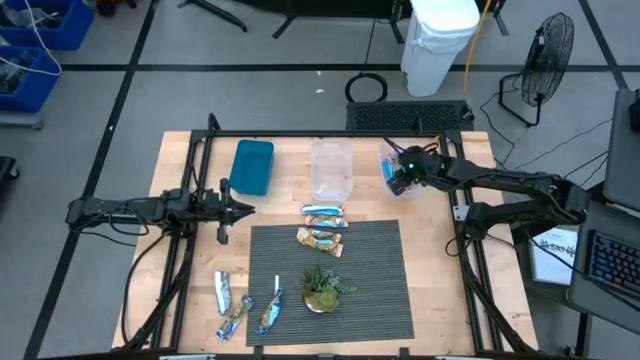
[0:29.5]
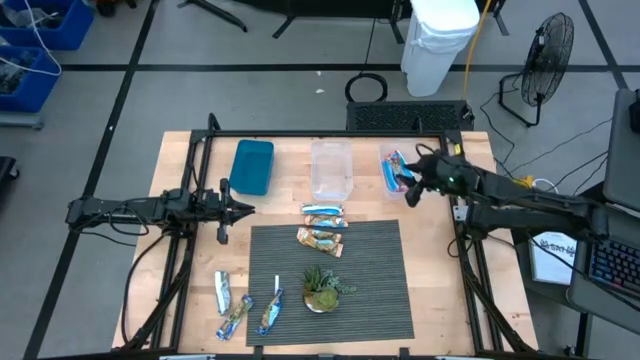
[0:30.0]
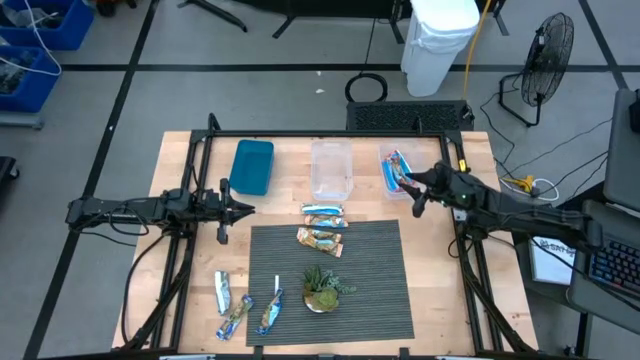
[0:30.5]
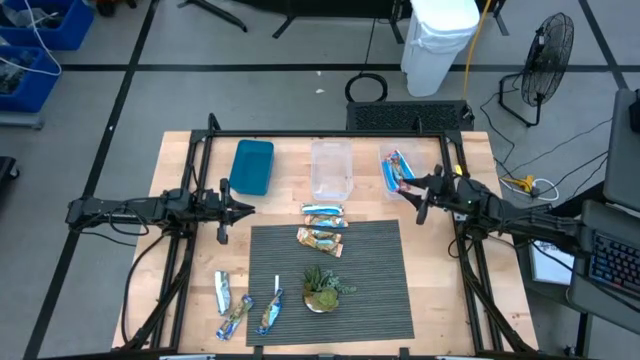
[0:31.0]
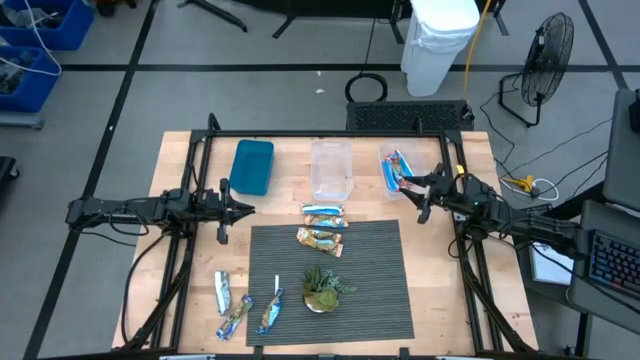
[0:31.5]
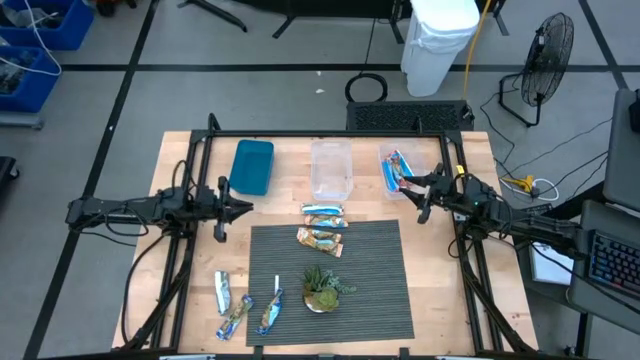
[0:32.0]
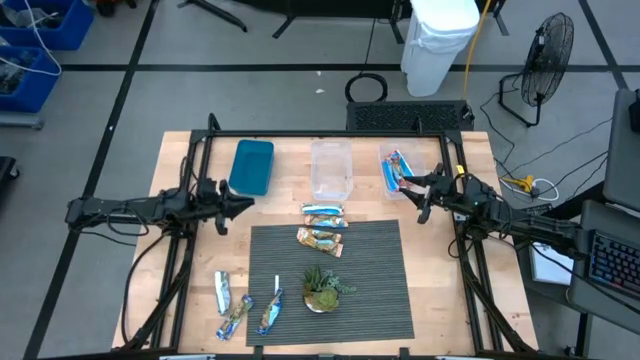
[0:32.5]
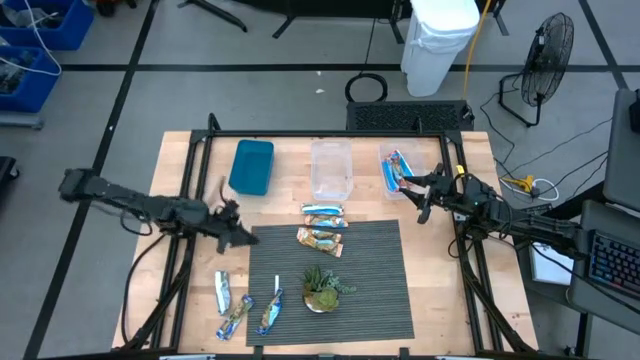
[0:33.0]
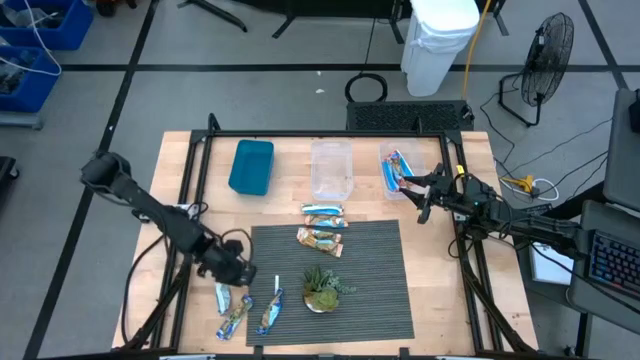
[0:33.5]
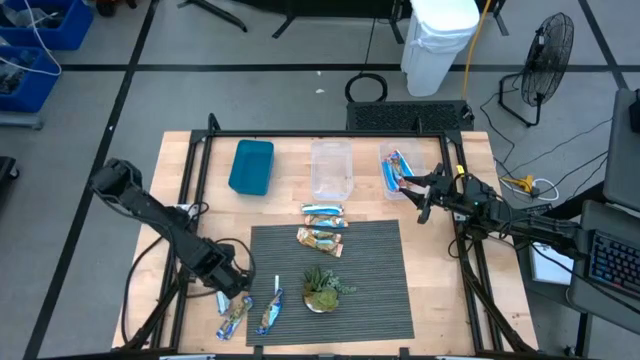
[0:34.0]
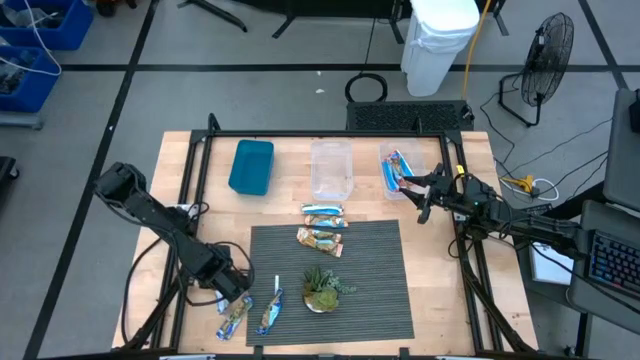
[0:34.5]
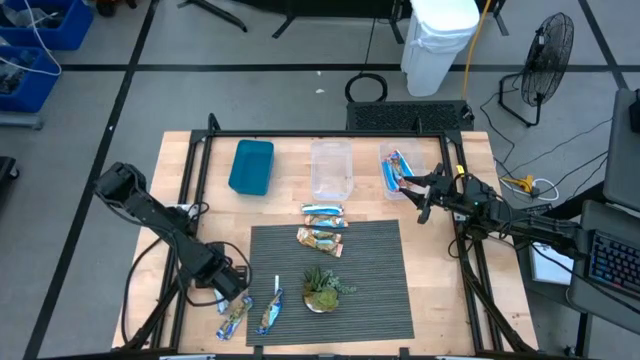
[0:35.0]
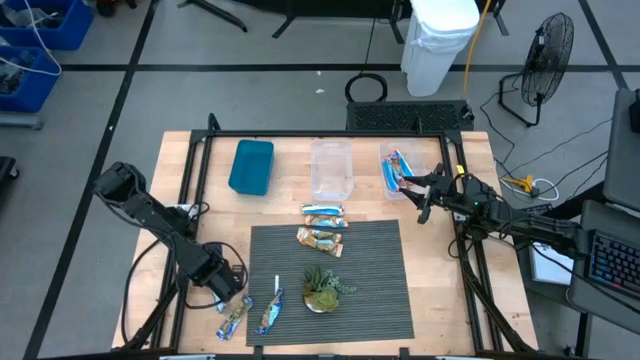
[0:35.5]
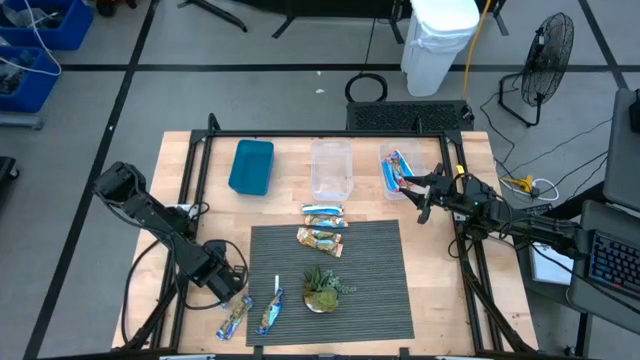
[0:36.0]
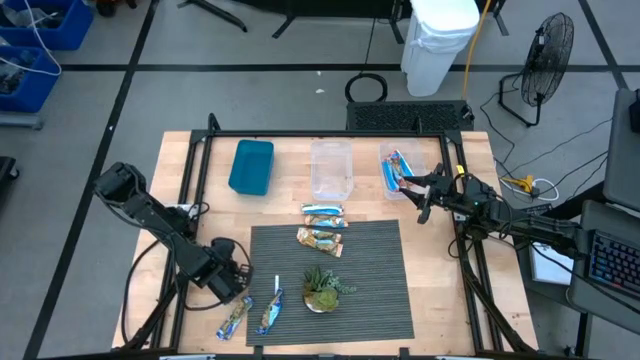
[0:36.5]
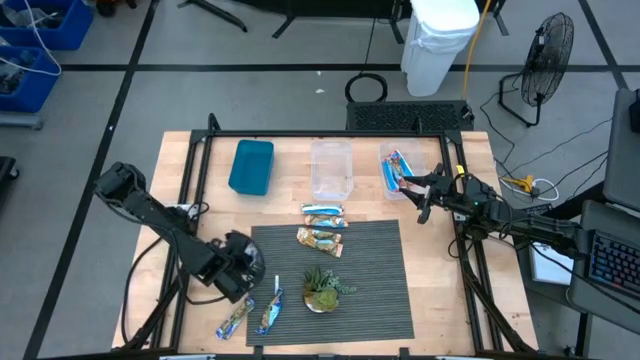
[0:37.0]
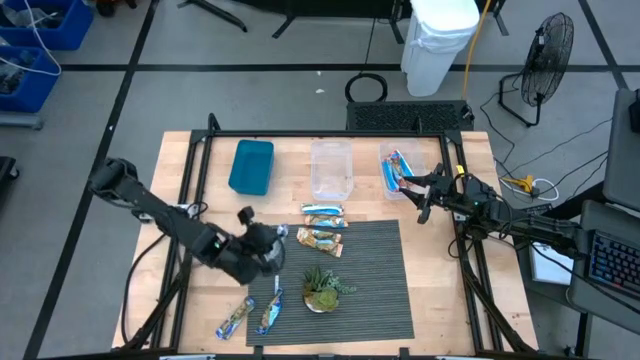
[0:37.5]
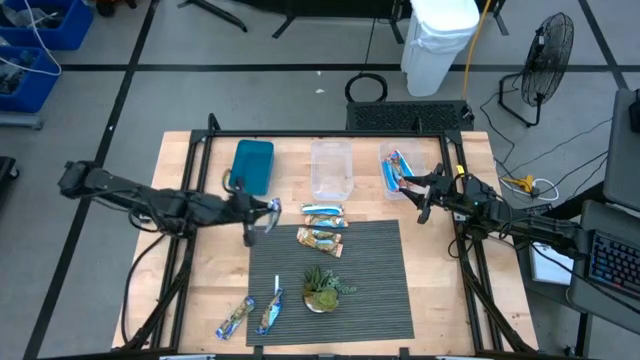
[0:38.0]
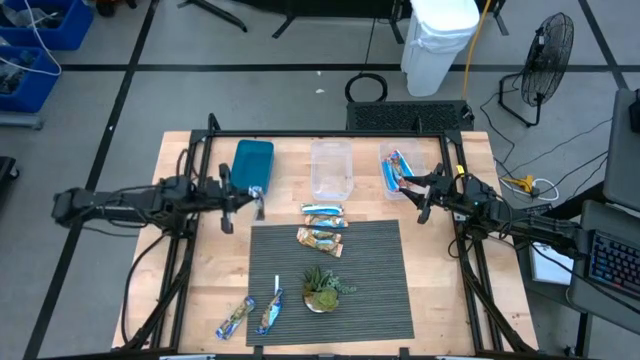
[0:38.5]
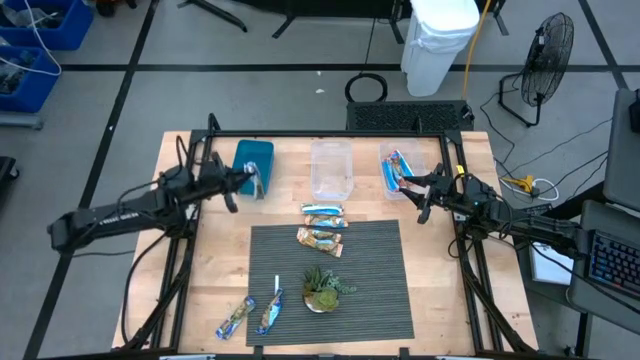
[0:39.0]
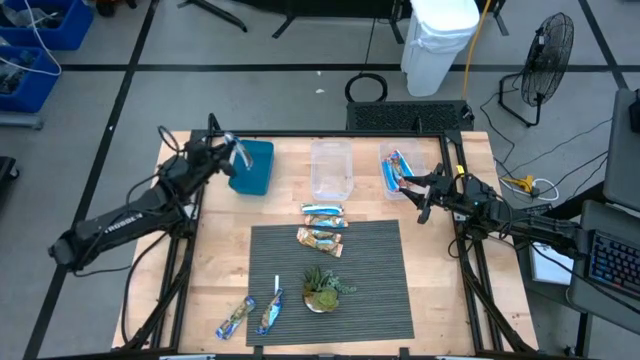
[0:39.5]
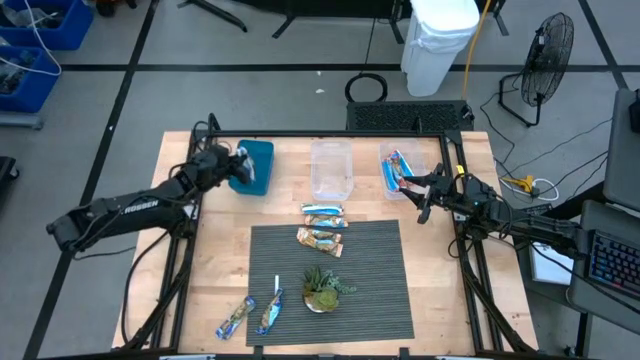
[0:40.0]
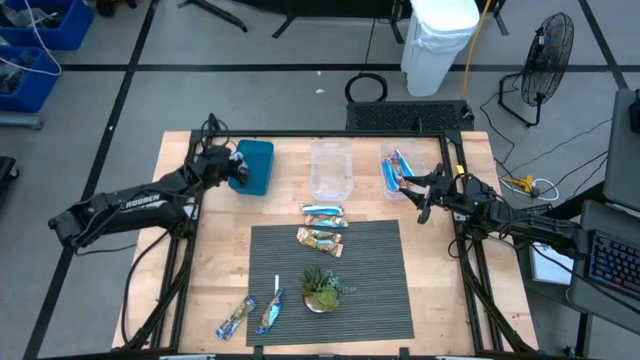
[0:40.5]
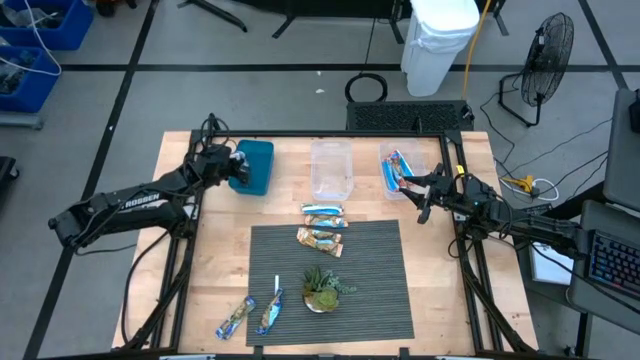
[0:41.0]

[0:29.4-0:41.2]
Task: Pick and place Granola Bars by type
Put the green granola bar into the blue bin

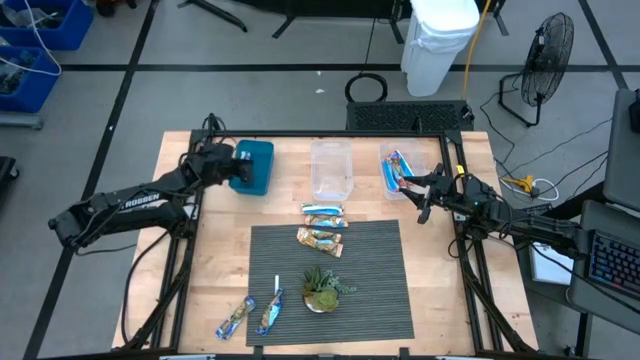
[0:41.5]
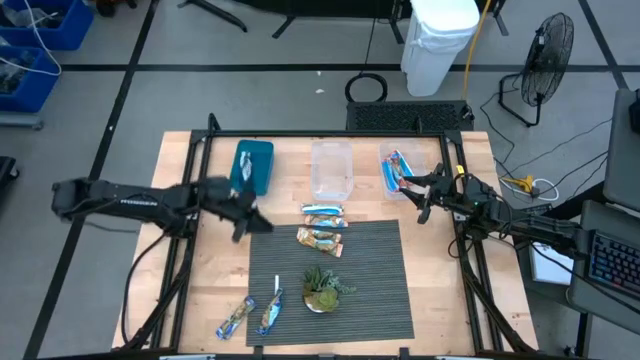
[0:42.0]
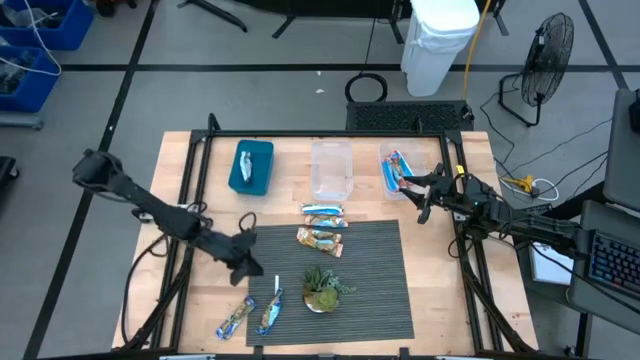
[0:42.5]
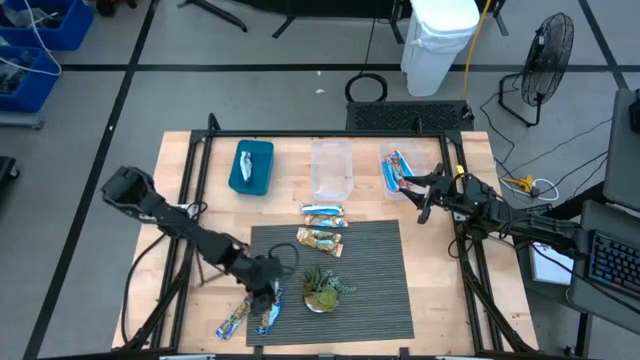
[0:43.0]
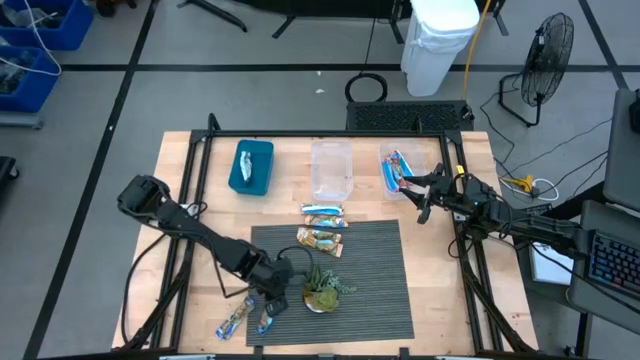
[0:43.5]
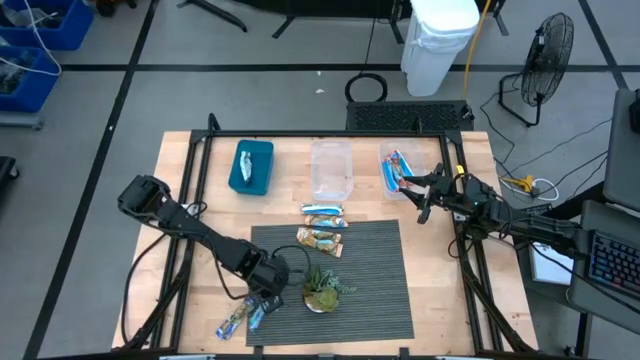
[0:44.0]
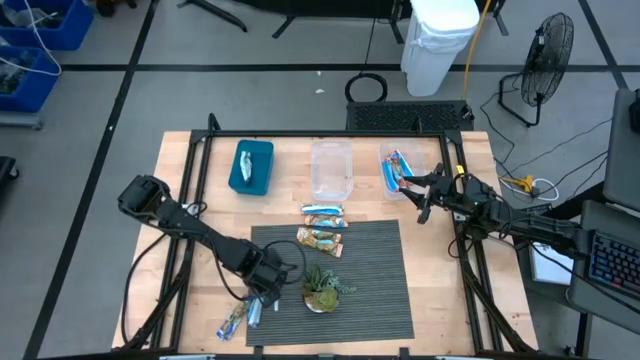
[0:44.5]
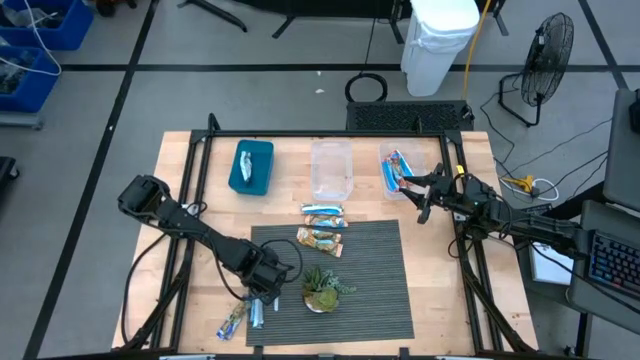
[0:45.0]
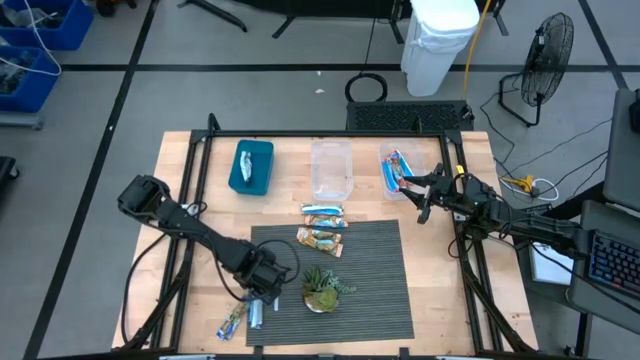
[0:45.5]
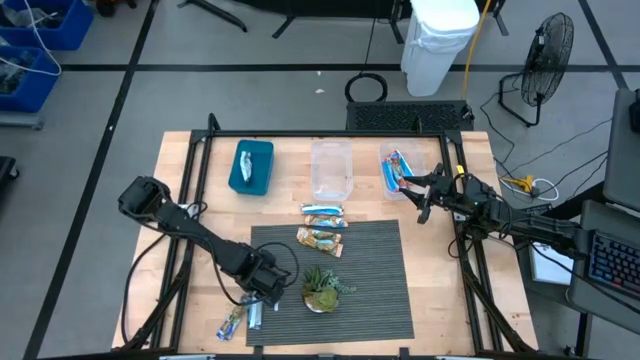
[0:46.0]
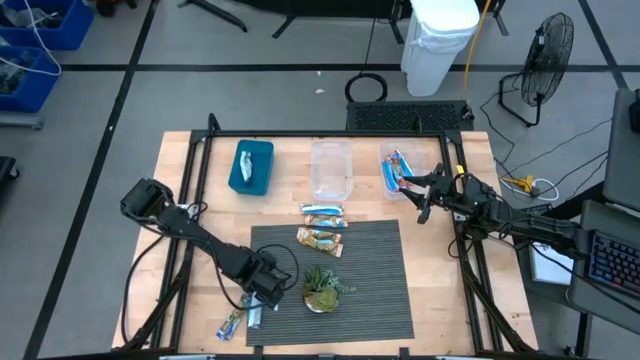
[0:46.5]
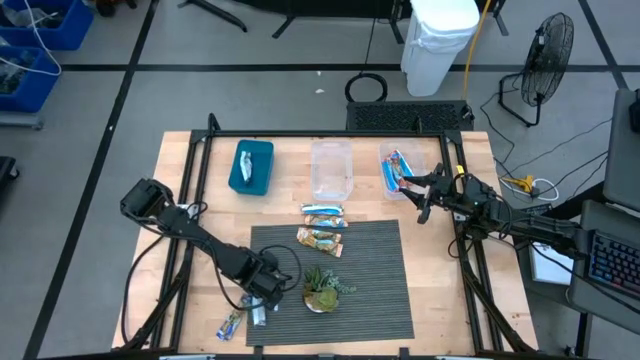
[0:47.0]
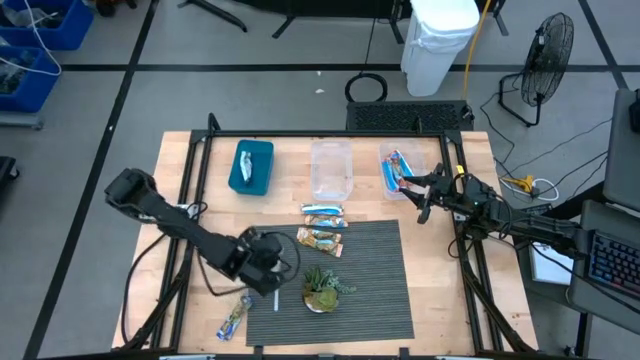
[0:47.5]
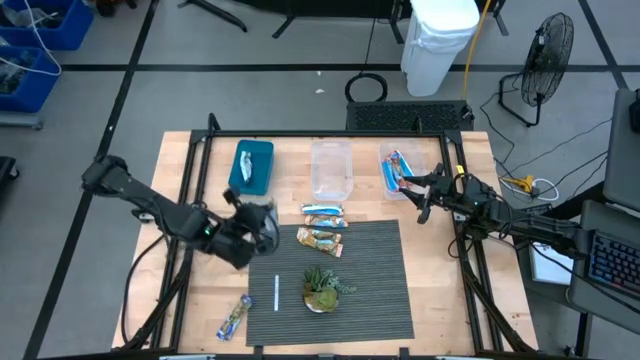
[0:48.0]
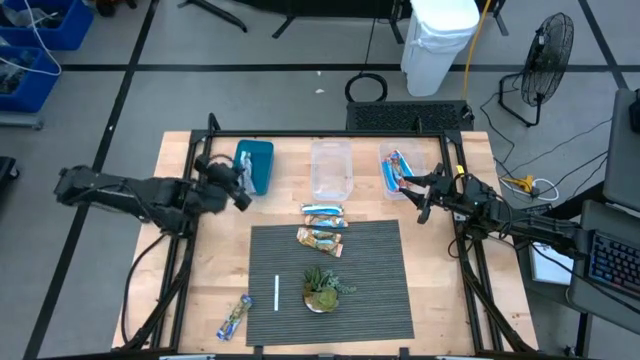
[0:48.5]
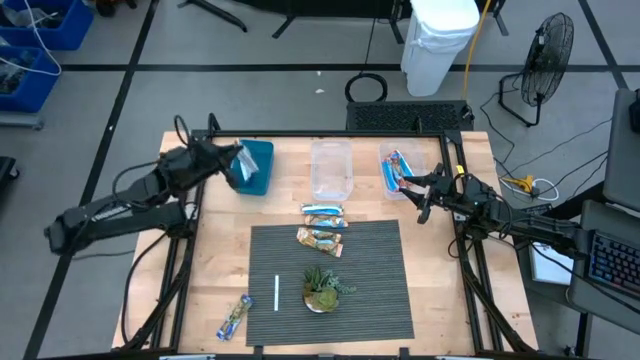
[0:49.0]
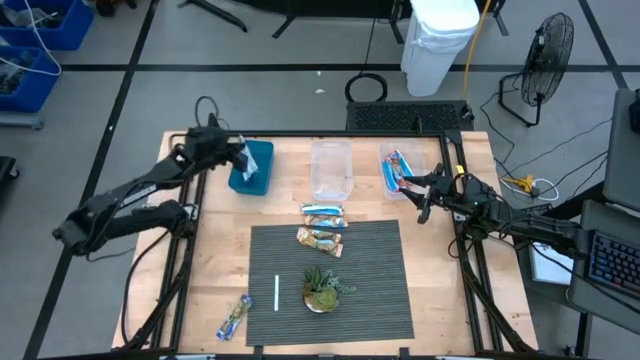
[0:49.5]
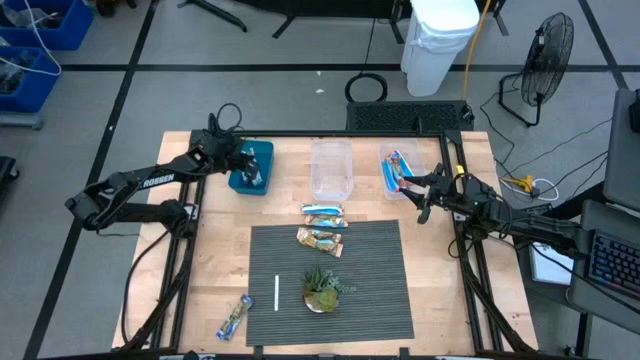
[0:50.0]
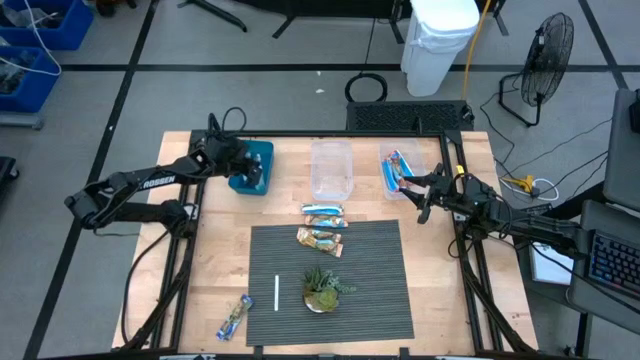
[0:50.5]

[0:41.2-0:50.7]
Put the green granola bar into the blue bin
